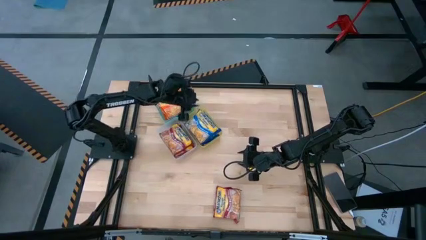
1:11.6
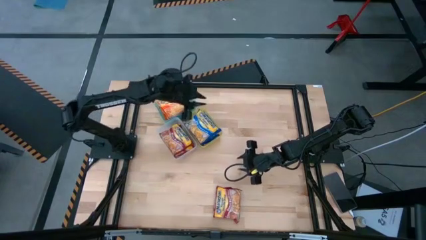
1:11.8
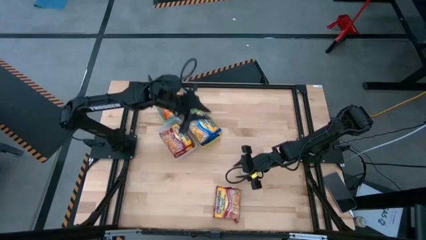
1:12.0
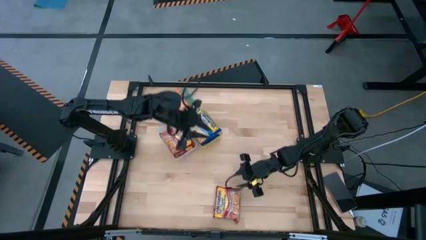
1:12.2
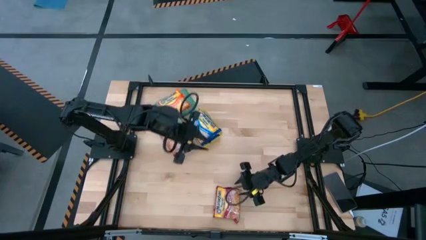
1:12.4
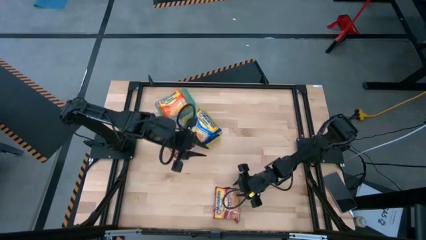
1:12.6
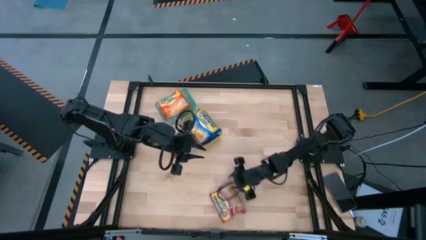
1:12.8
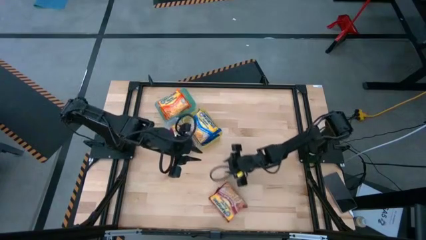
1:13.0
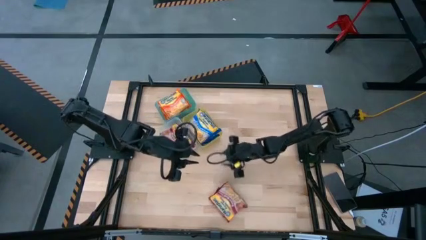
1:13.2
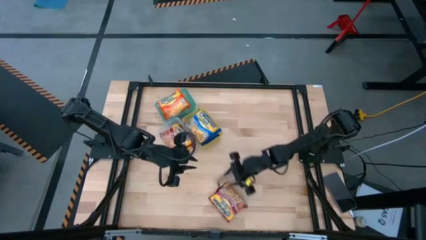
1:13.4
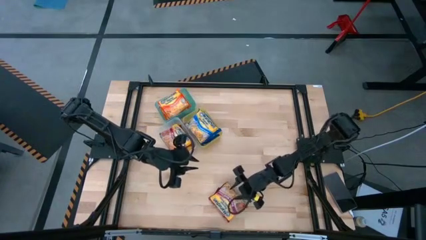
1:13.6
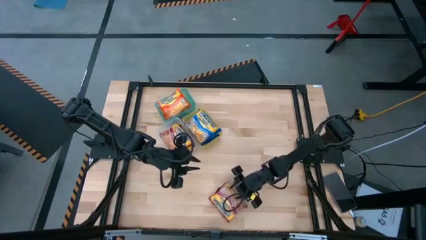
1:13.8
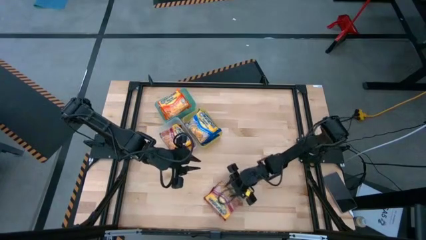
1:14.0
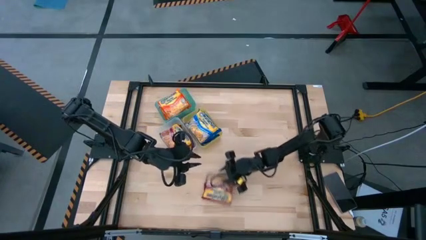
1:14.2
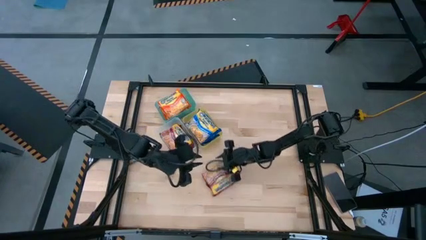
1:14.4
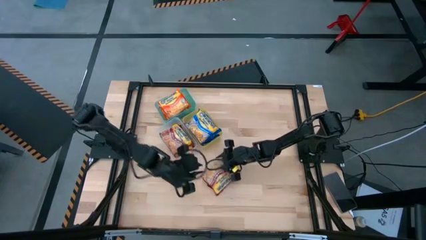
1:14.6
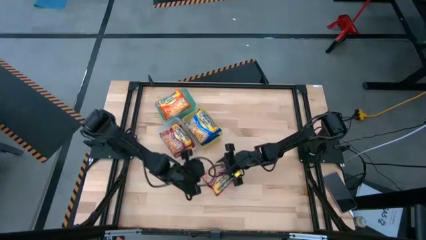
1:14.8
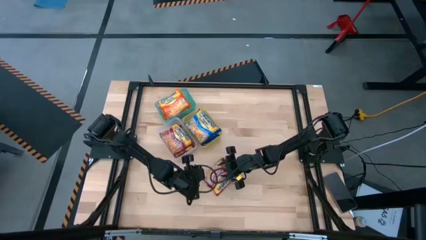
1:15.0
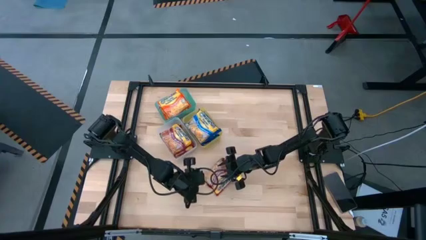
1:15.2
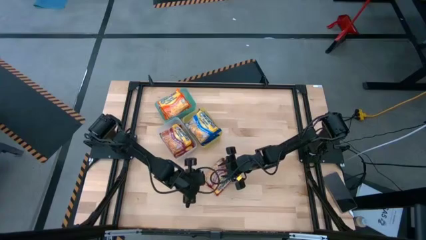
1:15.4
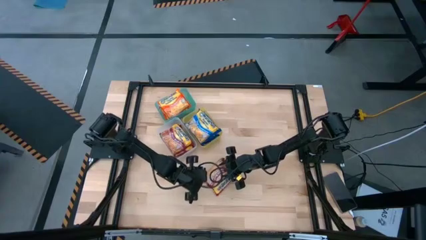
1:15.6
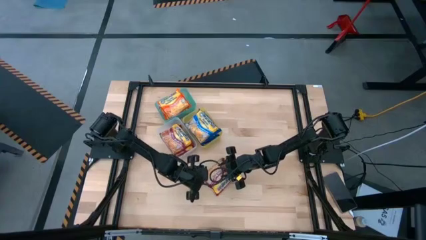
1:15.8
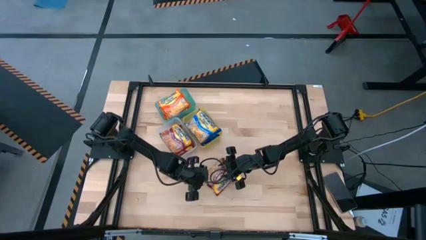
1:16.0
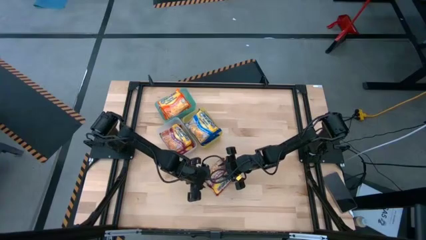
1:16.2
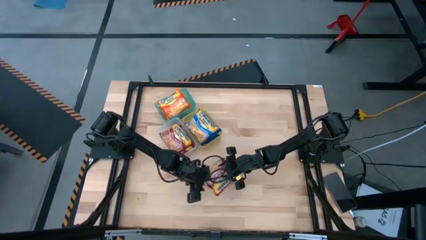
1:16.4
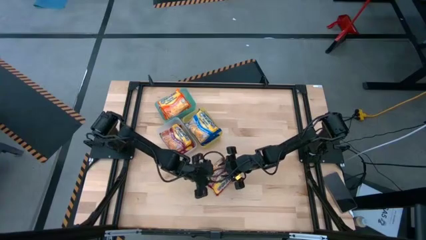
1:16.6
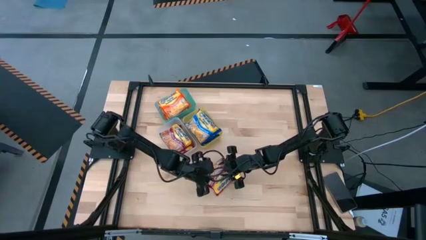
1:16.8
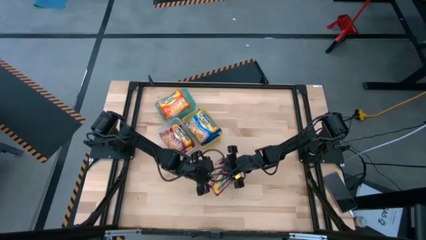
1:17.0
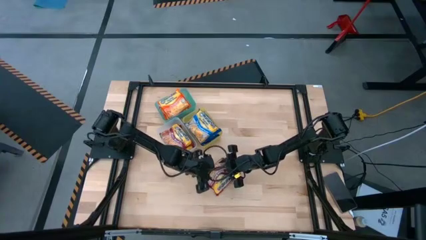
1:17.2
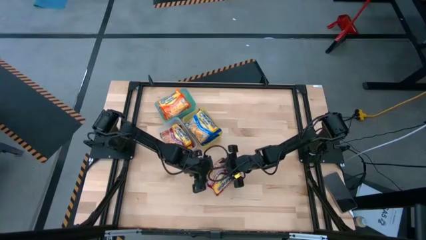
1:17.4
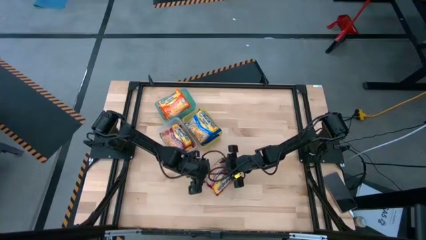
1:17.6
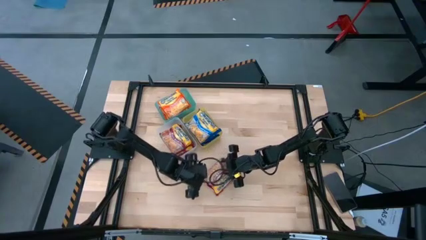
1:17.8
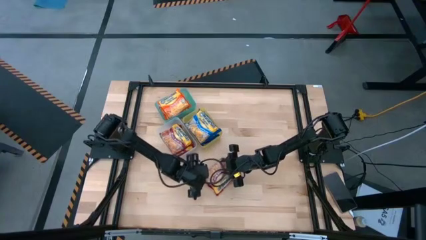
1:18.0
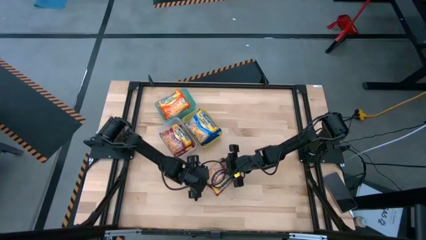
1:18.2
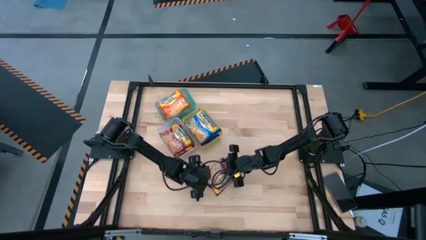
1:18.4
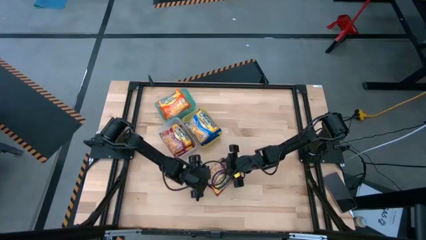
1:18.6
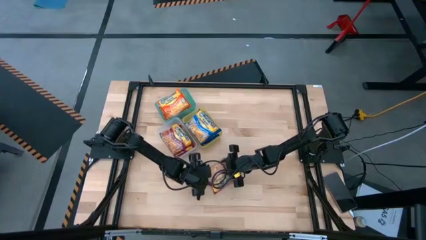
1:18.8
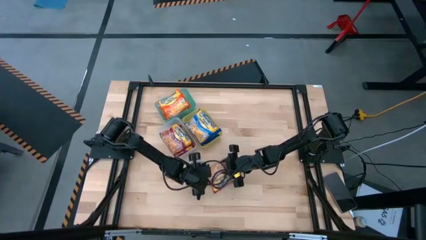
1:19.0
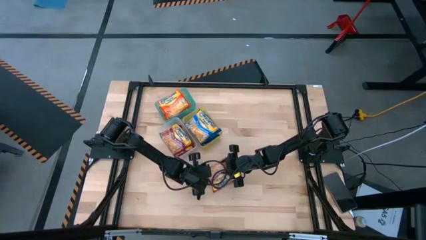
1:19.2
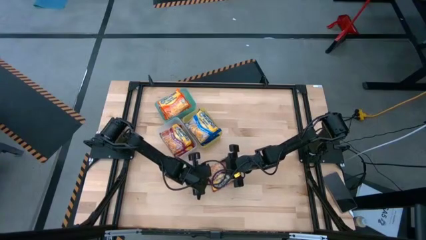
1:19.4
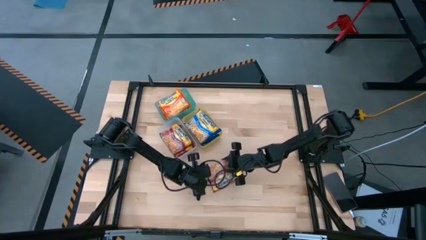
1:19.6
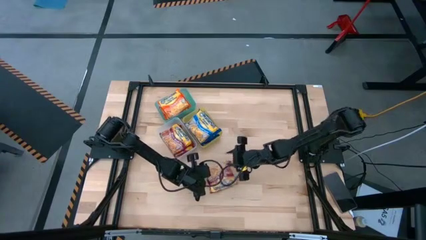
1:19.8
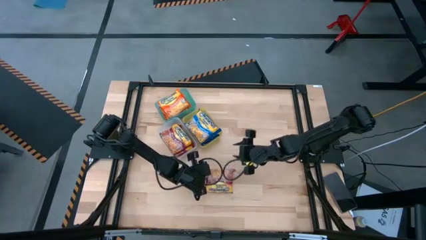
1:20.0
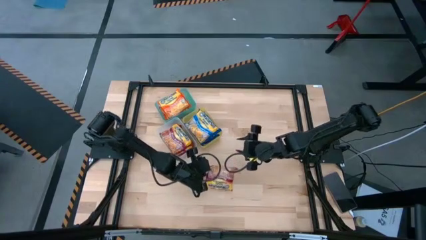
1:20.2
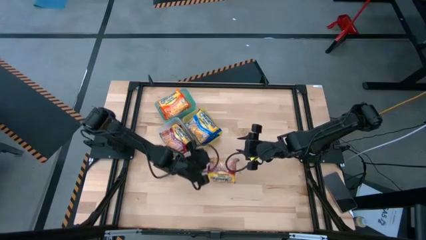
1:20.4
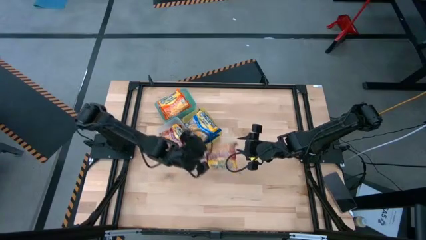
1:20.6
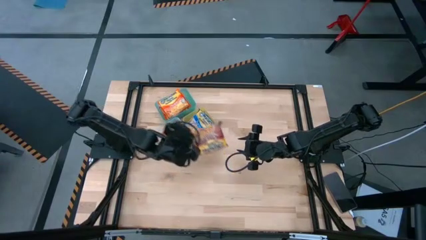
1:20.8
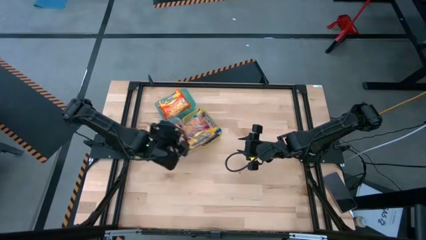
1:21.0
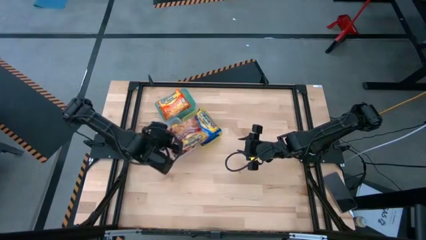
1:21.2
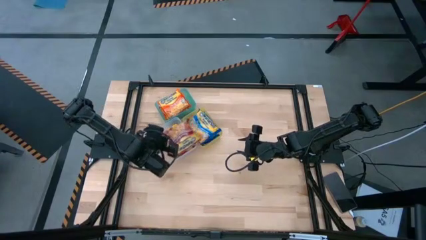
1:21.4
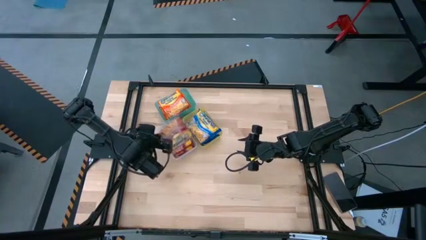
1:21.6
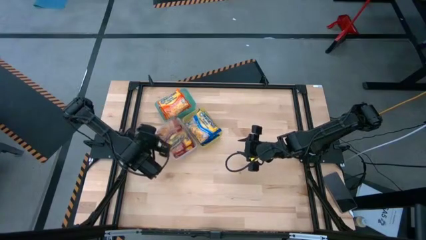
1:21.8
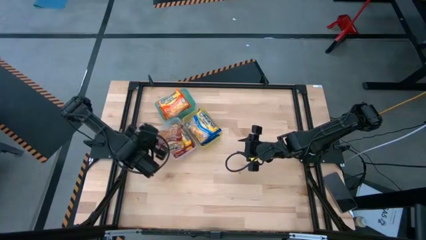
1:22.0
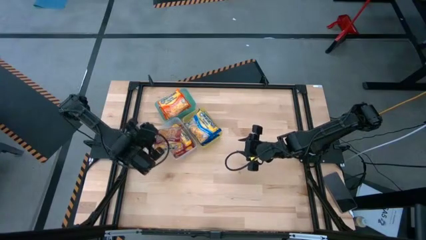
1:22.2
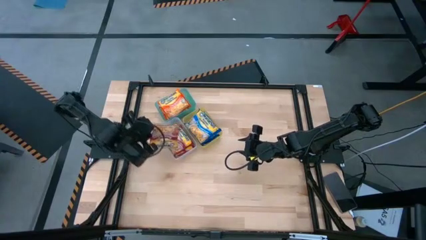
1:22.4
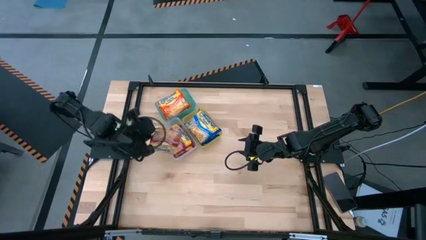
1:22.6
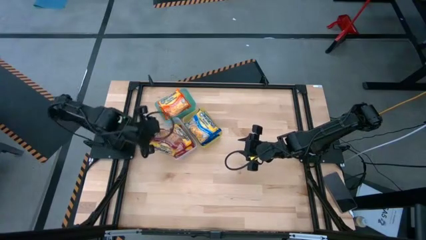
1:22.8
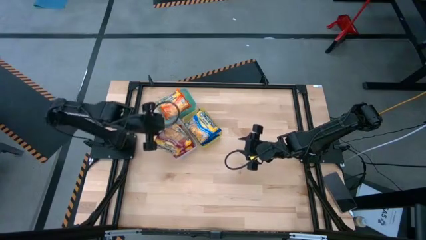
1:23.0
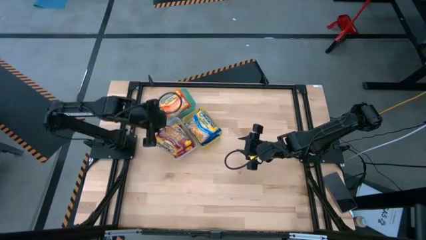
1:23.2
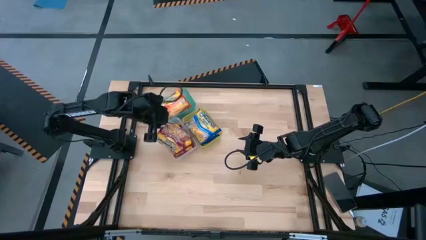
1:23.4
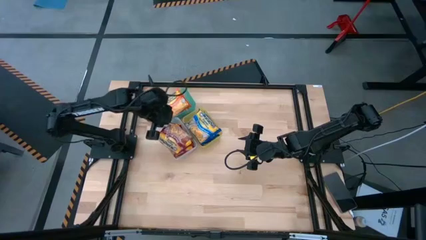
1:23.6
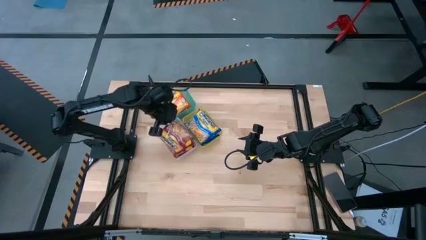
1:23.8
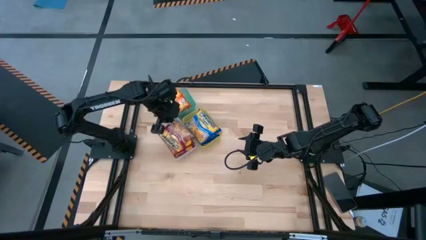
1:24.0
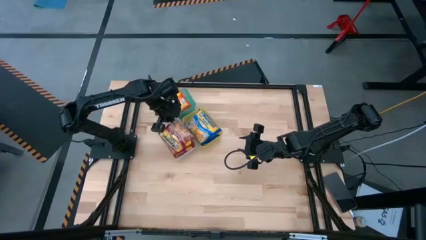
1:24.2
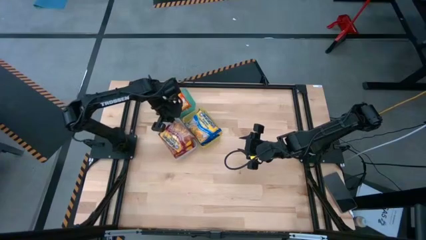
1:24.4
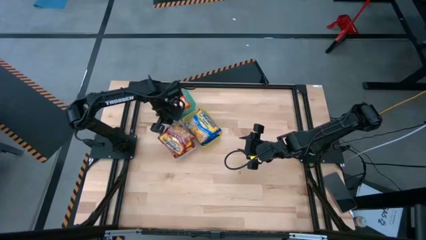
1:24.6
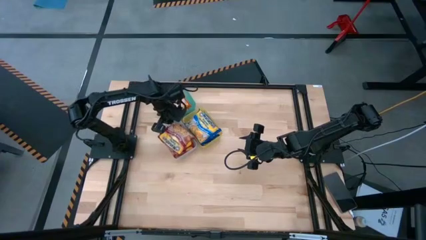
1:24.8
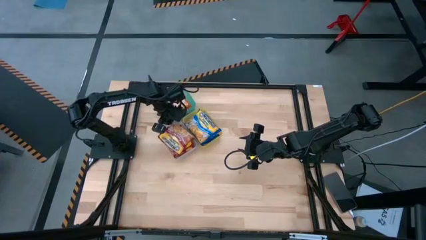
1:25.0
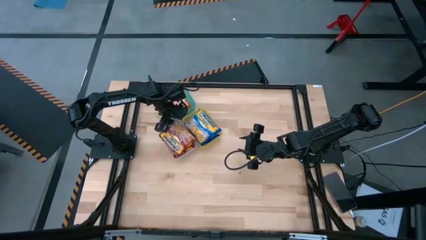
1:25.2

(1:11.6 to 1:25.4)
Task: Sort Maruchan noodles
Put the bottom red noodle pack into the transparent bin

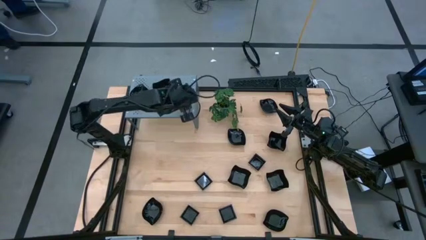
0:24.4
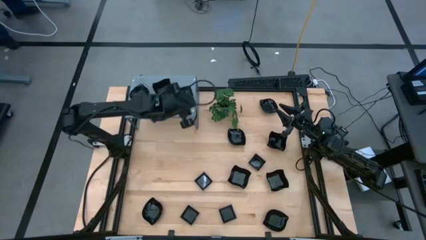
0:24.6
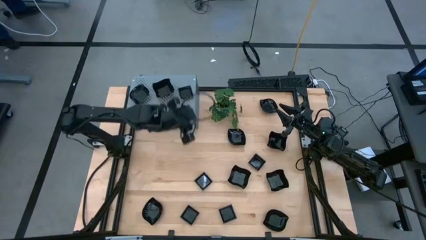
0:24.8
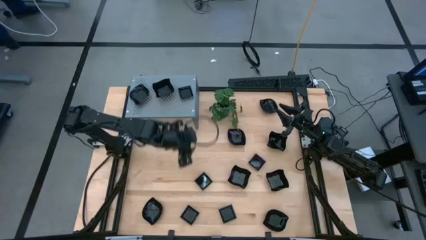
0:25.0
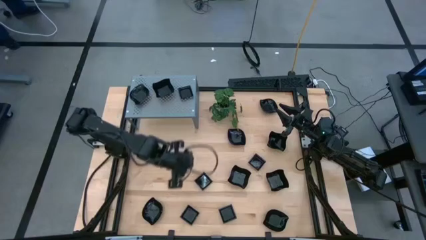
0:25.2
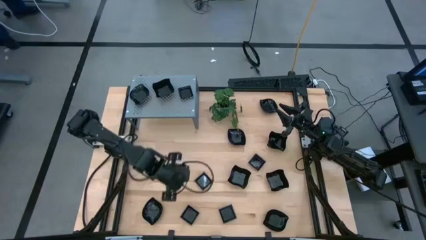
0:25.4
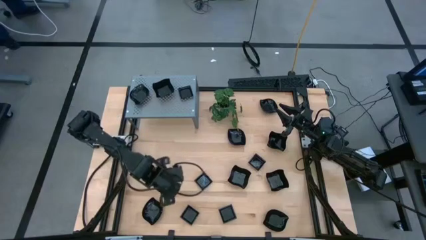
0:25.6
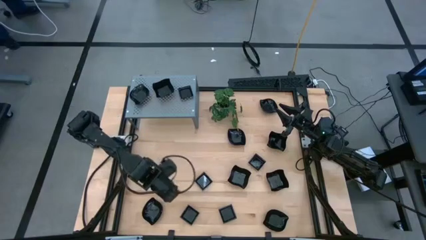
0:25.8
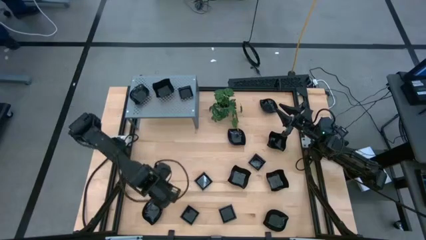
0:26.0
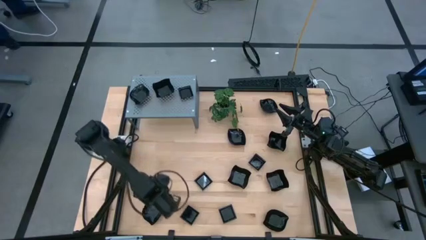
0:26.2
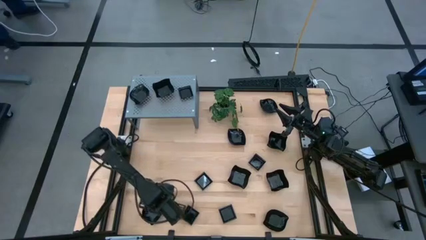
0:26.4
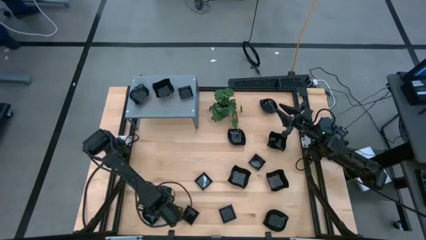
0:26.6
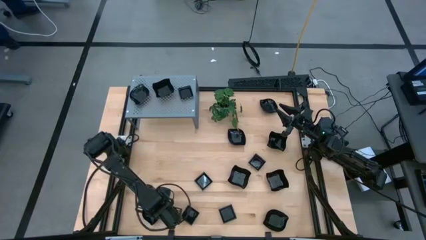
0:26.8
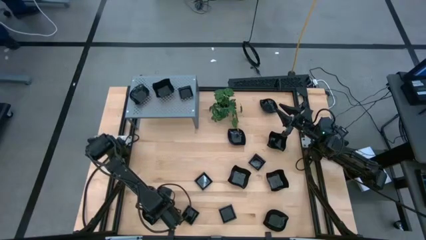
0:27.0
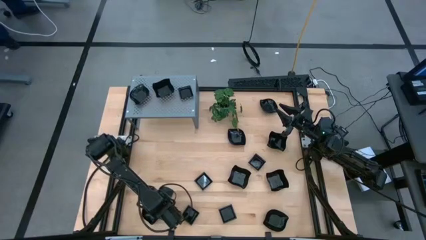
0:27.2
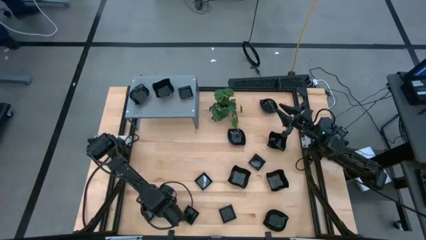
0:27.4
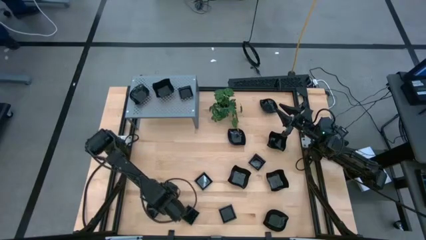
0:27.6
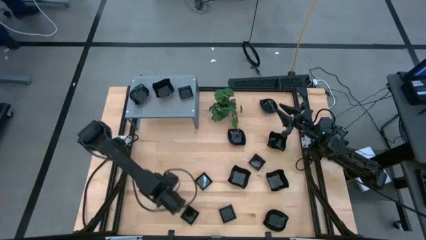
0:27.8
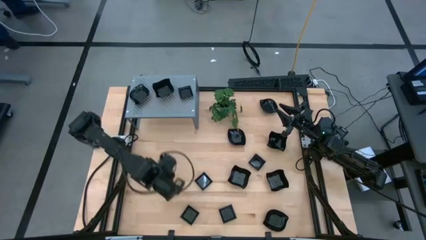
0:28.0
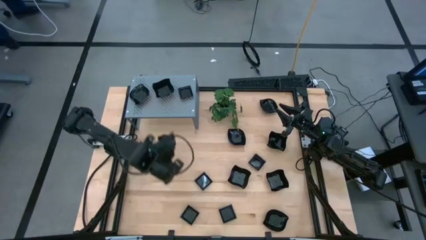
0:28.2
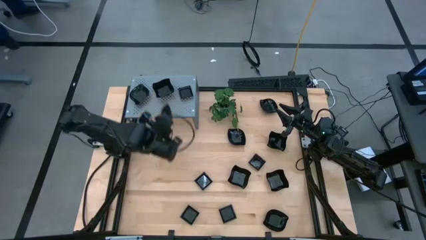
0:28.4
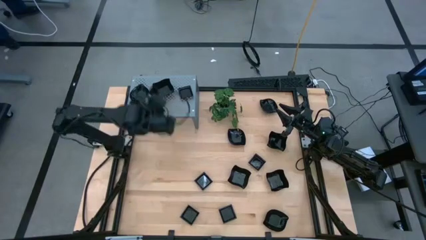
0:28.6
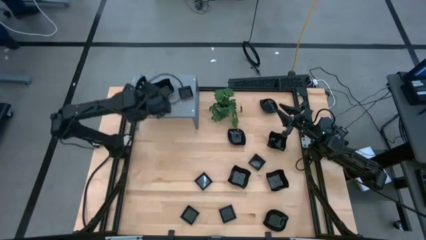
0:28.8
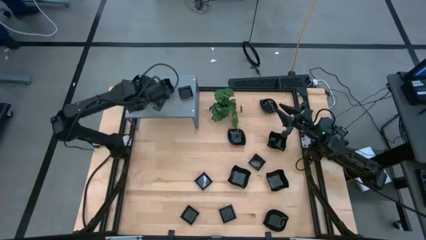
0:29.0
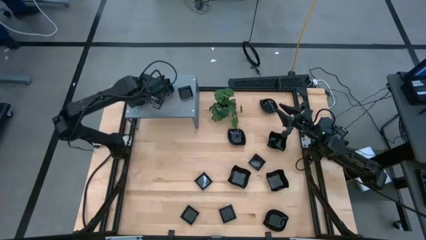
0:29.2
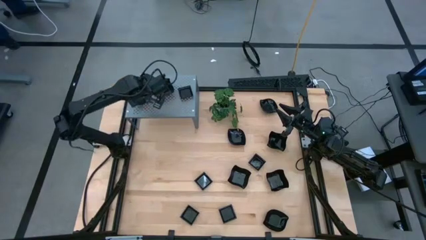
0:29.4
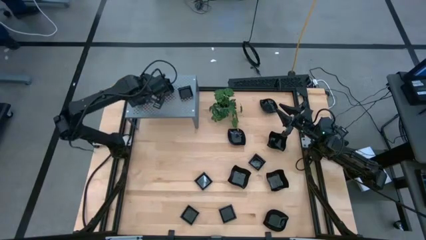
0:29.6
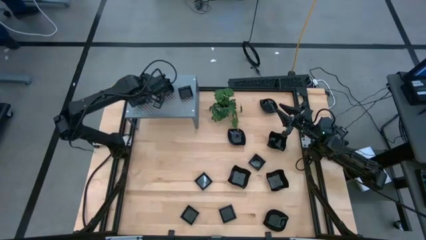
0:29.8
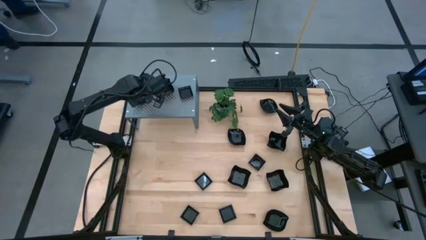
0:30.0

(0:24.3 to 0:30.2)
Task: Pick & Place Mini shaped plates
Stack the black leaf plate on top of the black leaf plate on the shelf
